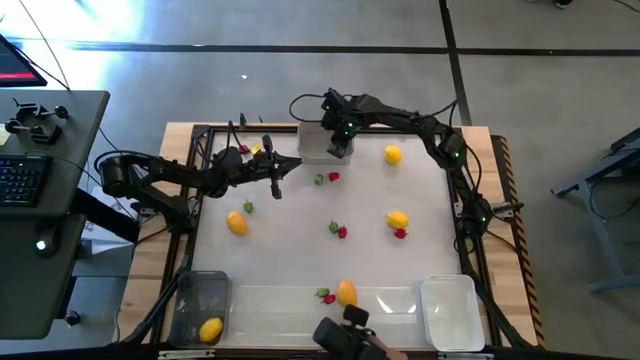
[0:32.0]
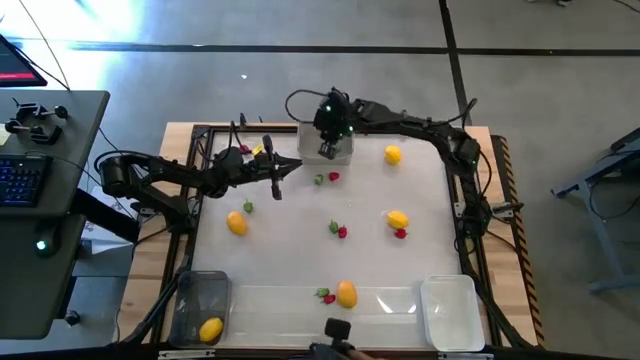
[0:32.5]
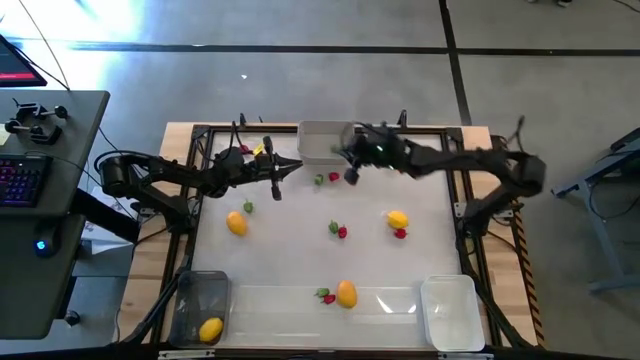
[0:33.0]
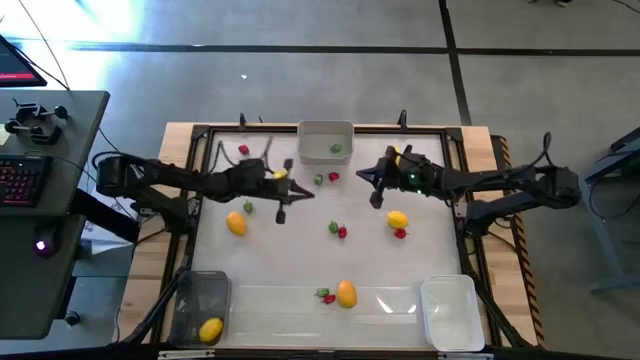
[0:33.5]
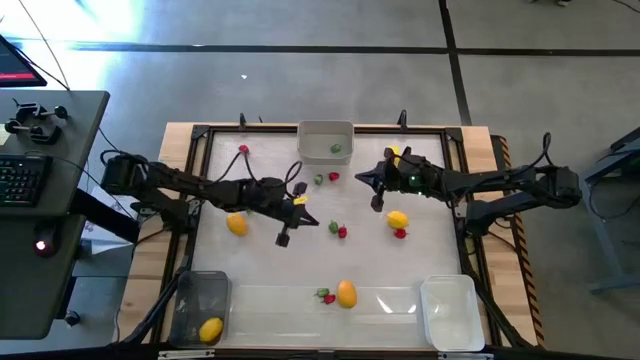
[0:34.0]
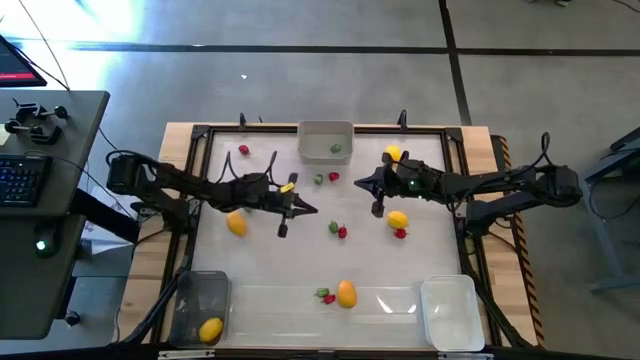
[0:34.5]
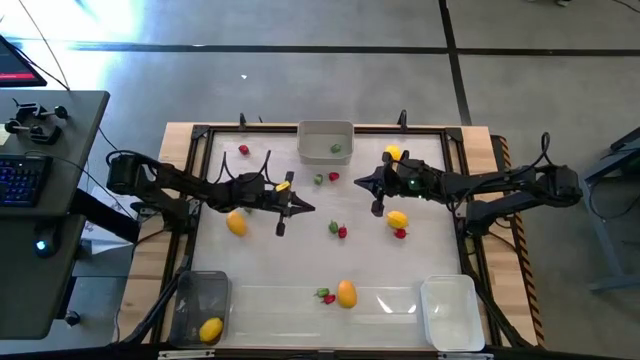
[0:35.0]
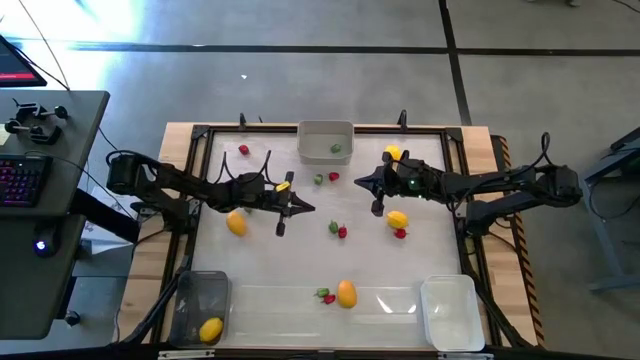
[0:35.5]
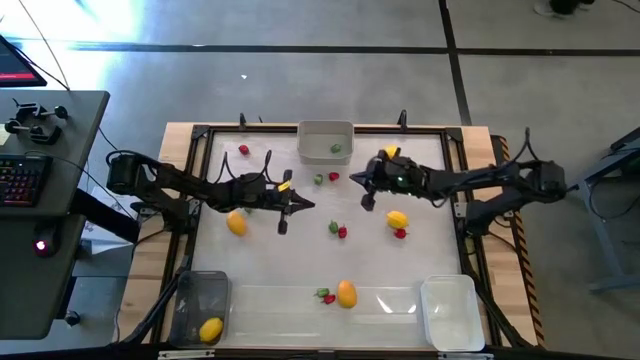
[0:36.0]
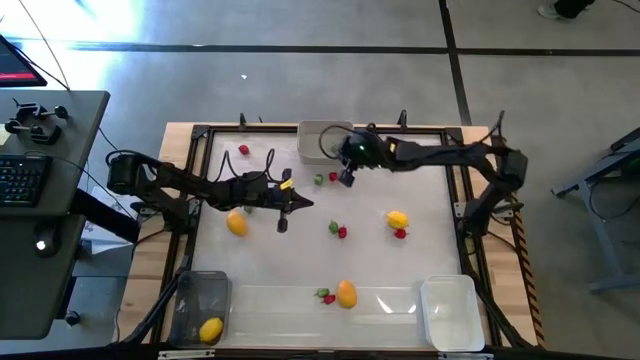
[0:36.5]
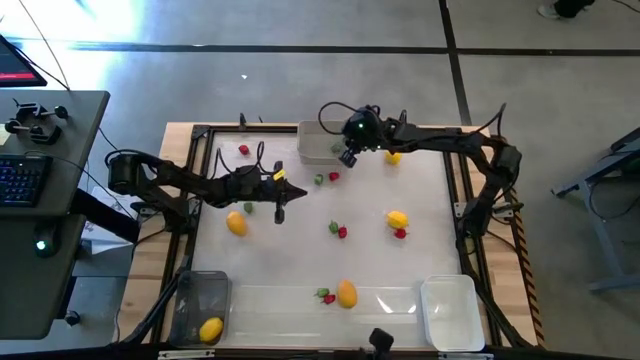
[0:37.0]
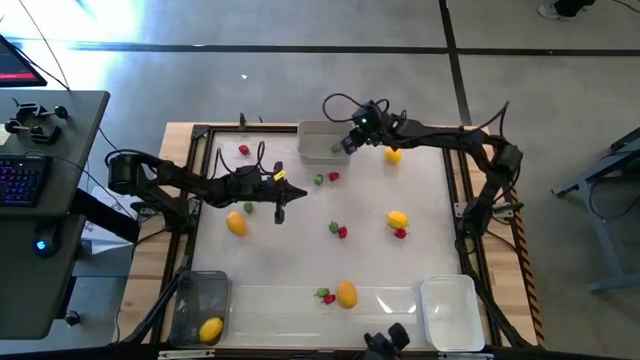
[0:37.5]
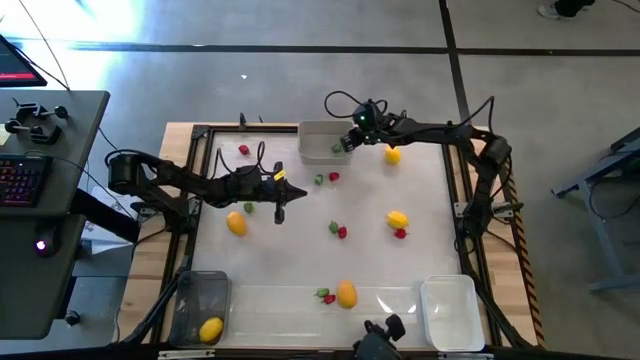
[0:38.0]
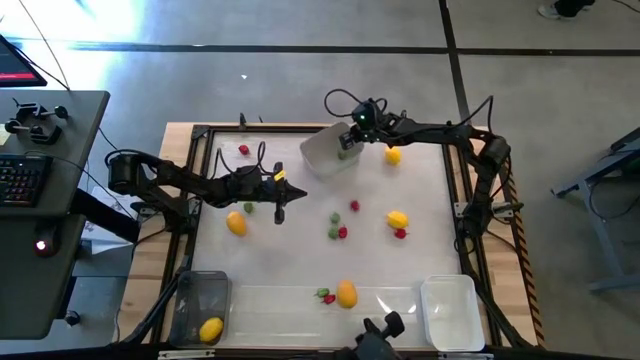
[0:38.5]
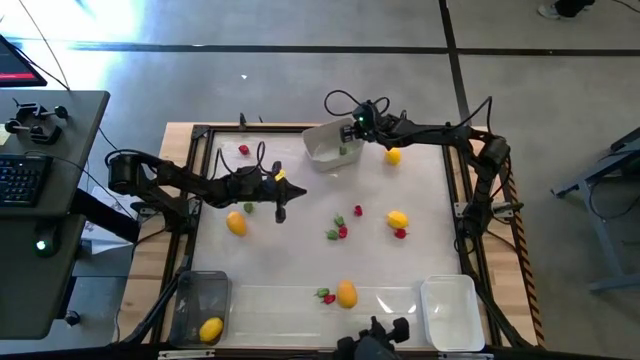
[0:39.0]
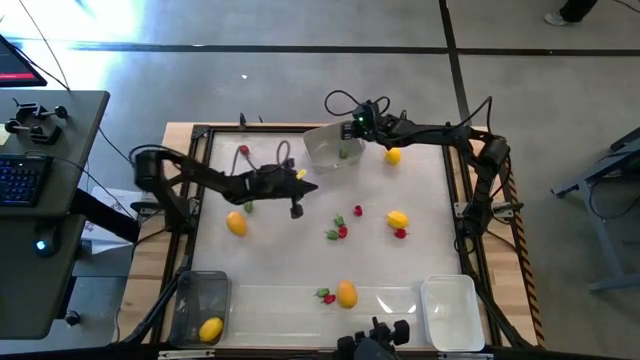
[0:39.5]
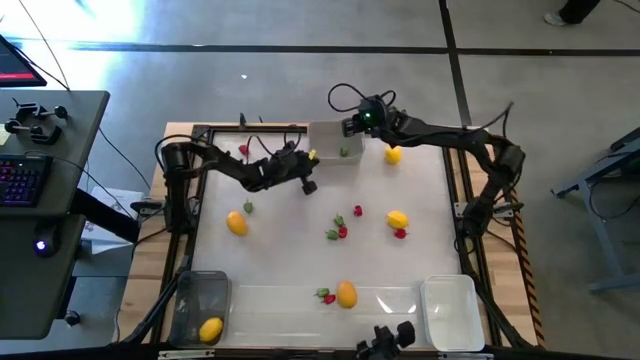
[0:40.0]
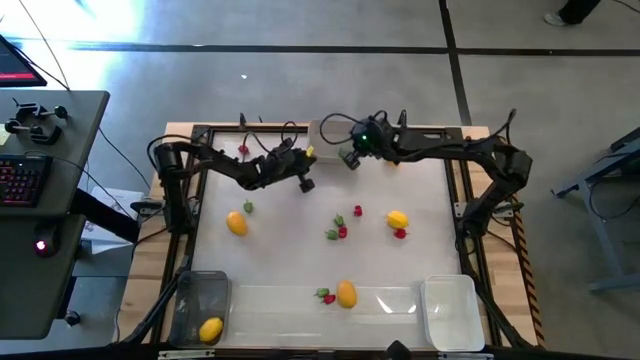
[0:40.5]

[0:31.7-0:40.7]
Task: Sort produce into baskets
Adjust the gray bin

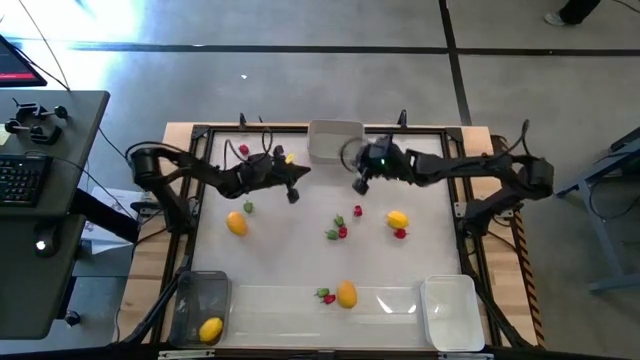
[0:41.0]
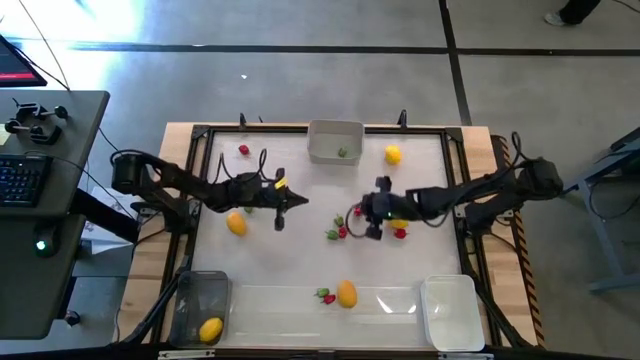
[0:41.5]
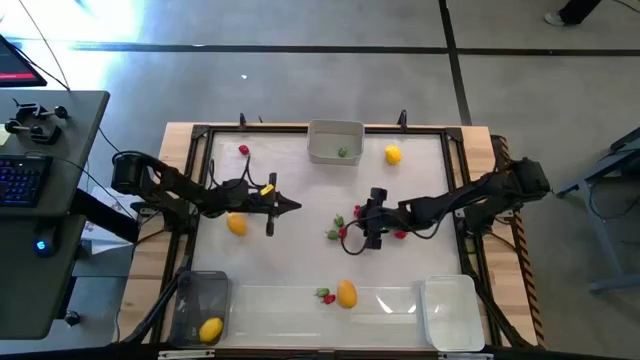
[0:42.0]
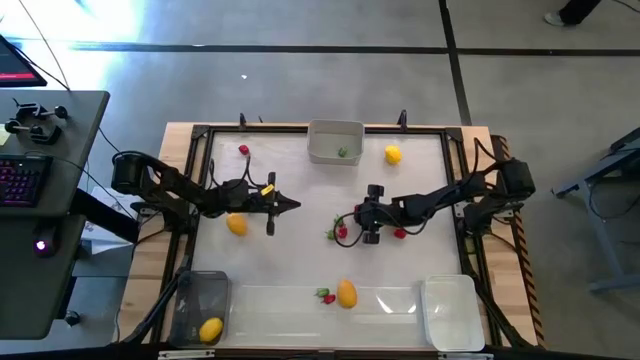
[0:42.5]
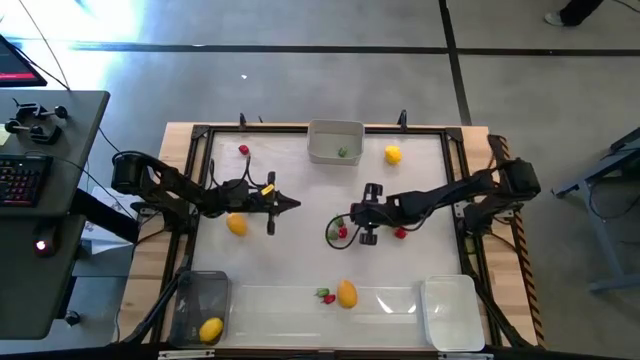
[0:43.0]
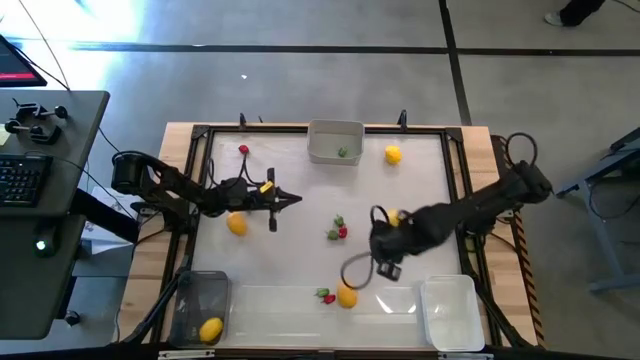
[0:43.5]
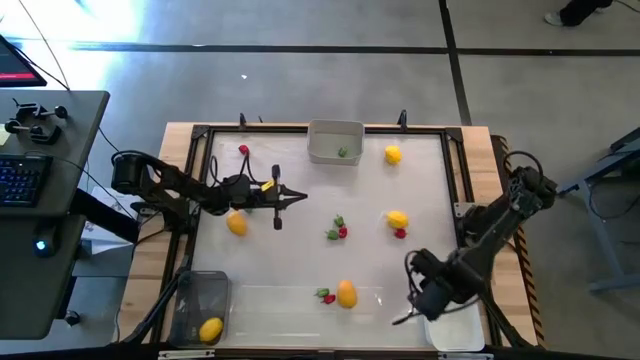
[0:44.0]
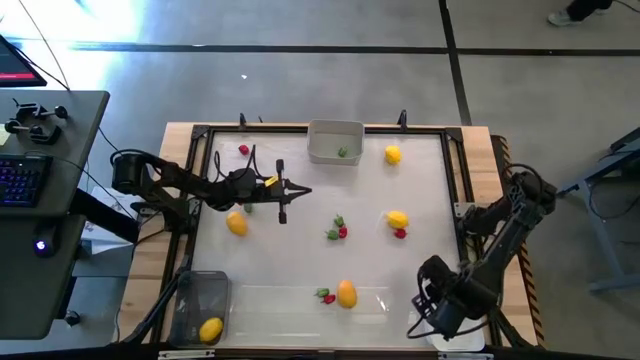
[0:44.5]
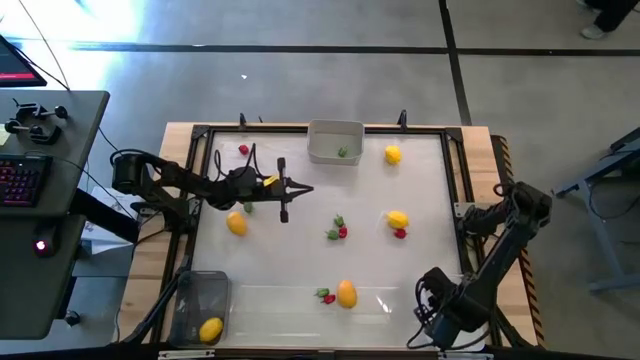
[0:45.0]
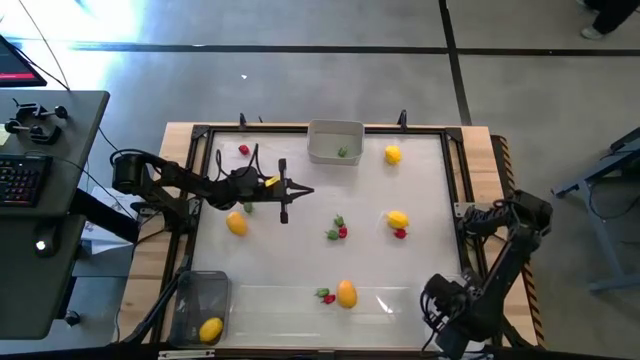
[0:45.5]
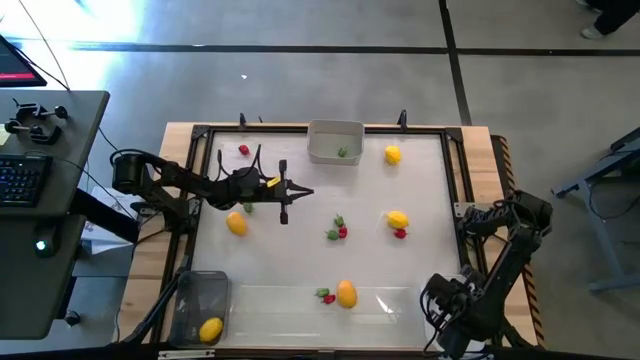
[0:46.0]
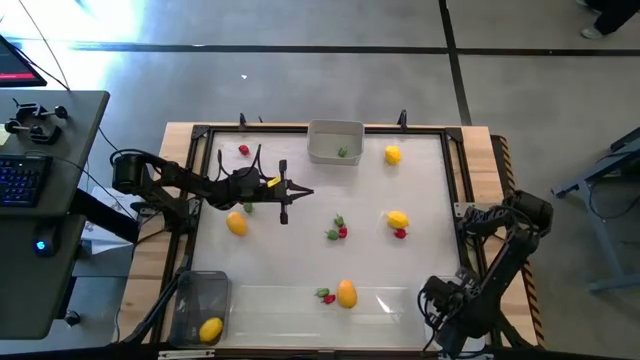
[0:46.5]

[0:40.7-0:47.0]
Put the red chili pepper into the white bin

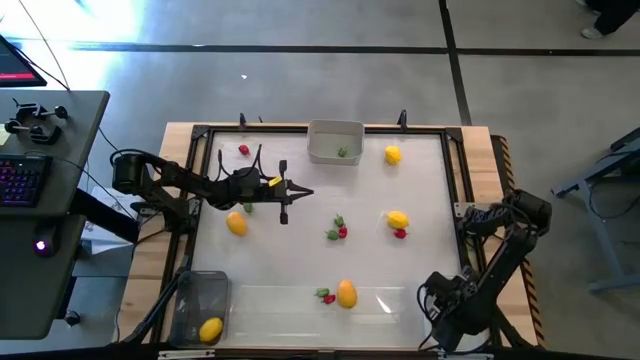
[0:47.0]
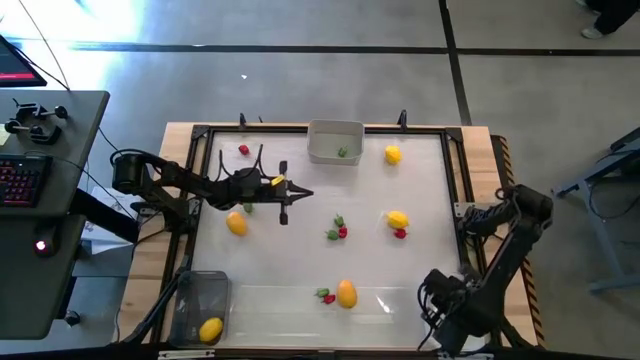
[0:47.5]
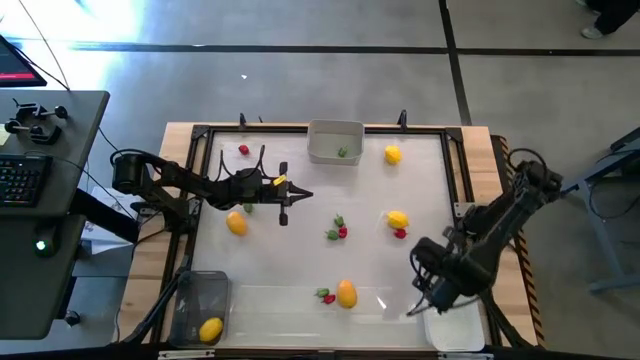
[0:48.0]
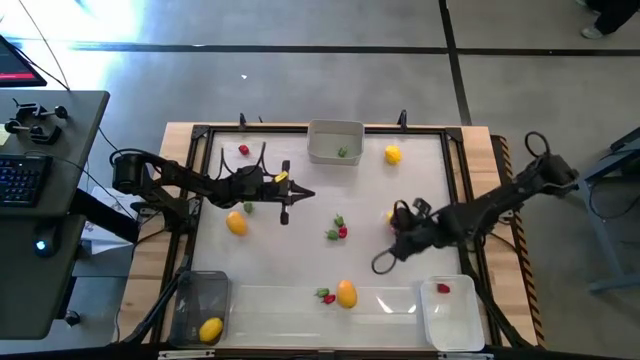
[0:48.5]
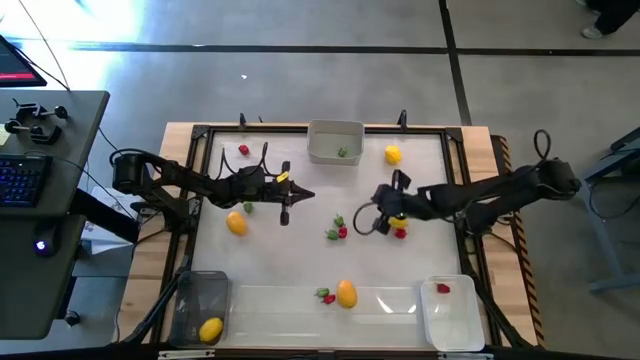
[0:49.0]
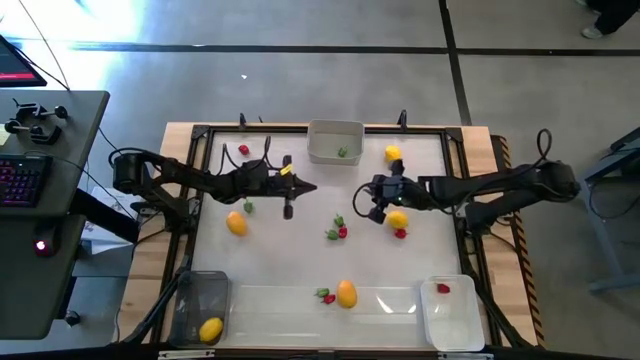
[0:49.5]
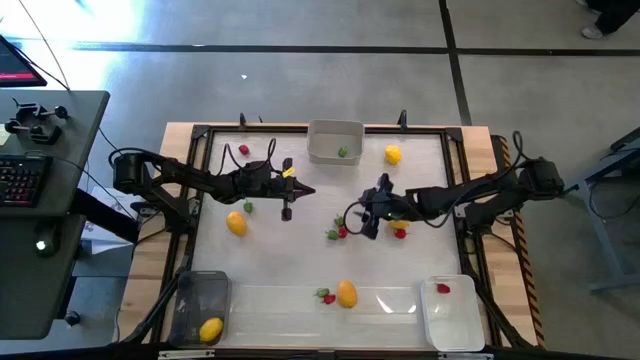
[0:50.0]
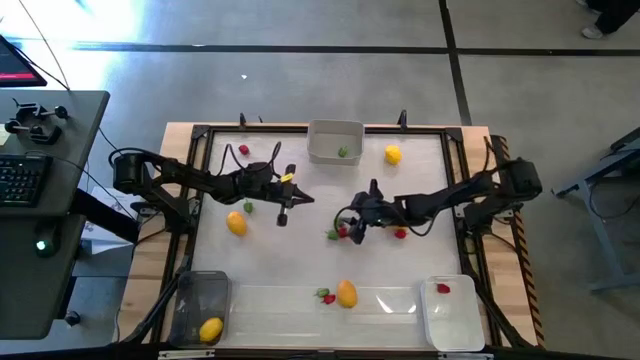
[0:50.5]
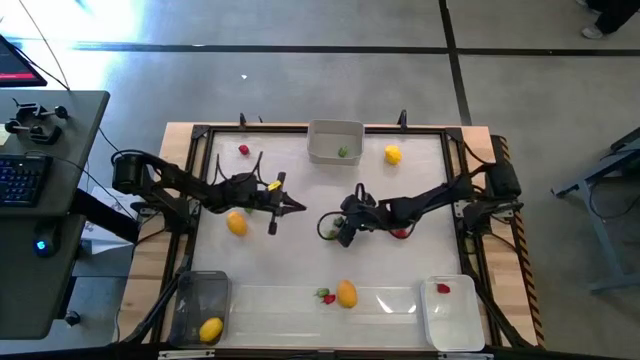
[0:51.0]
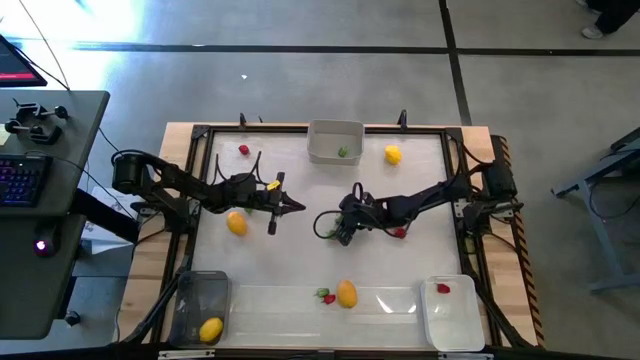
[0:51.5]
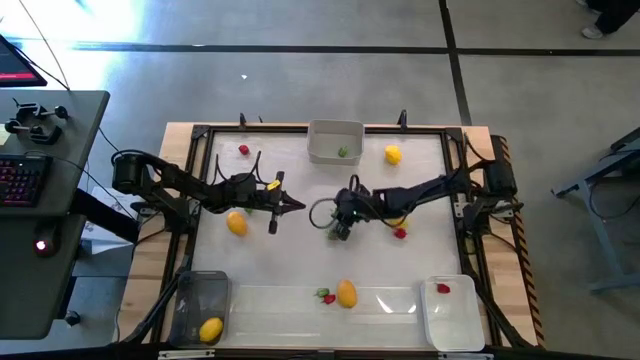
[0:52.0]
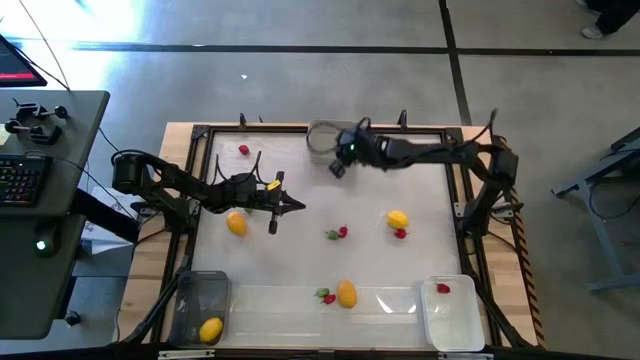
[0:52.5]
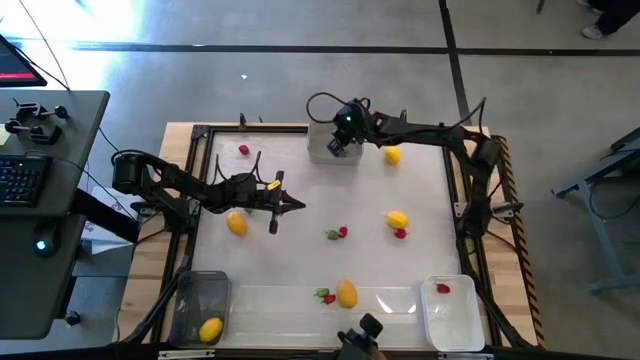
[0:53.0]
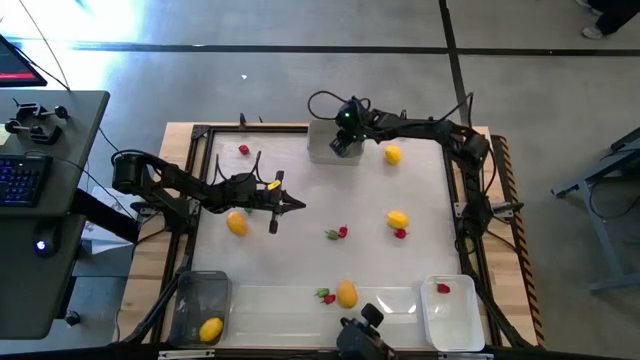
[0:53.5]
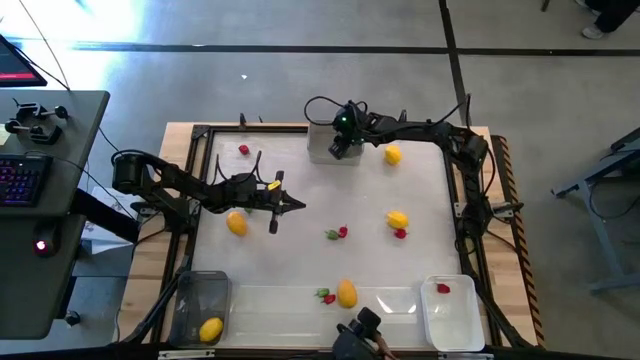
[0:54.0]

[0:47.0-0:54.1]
Put the green chili pepper into the gray bin
